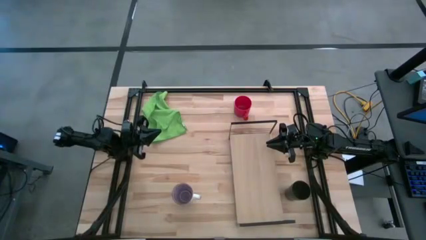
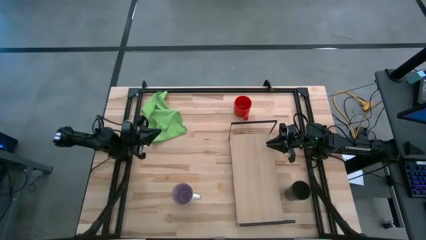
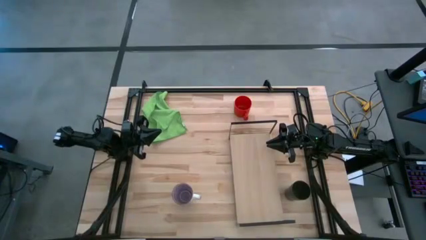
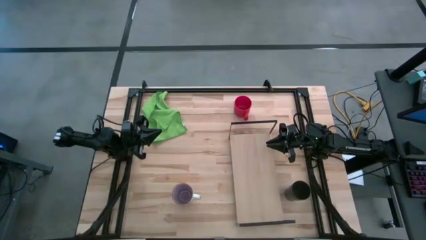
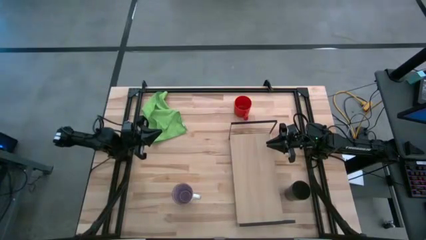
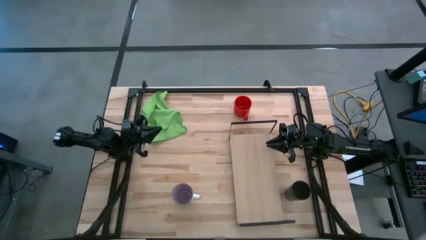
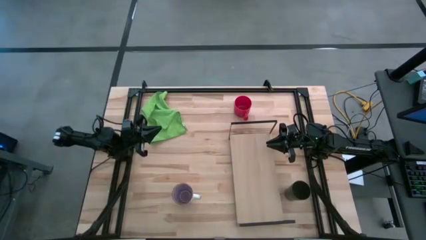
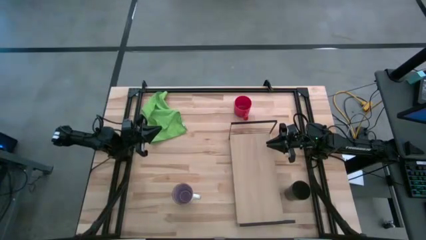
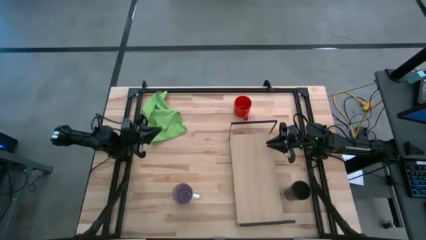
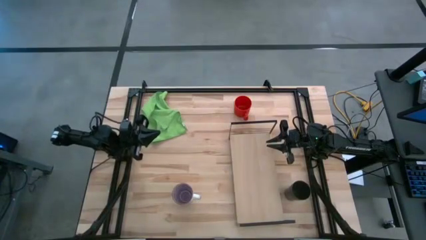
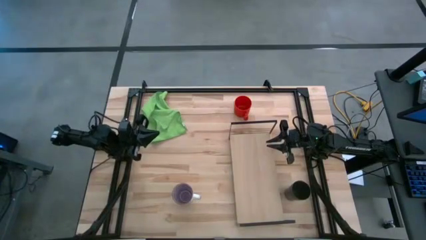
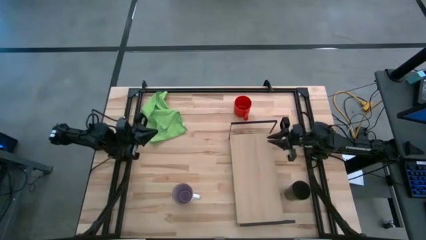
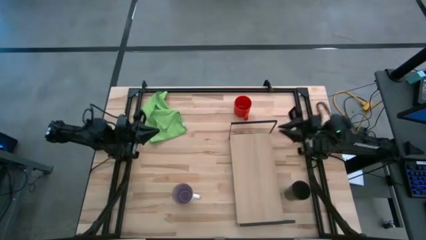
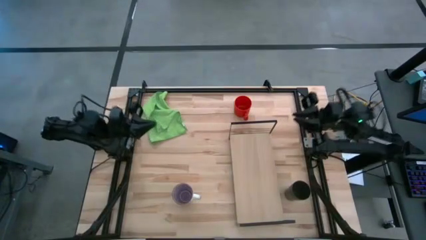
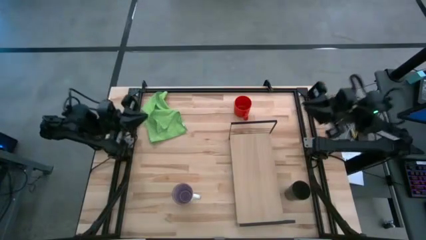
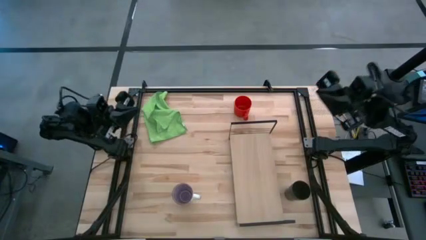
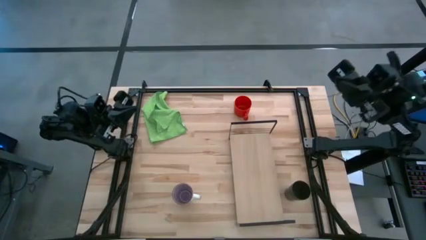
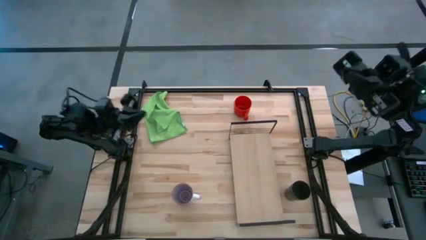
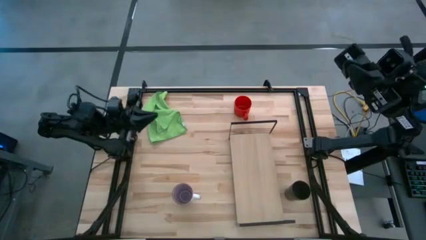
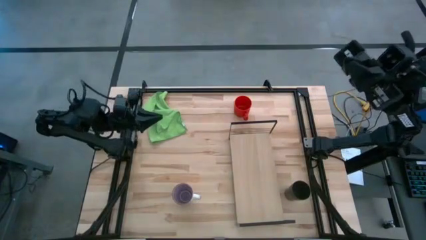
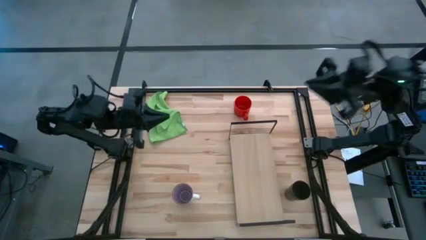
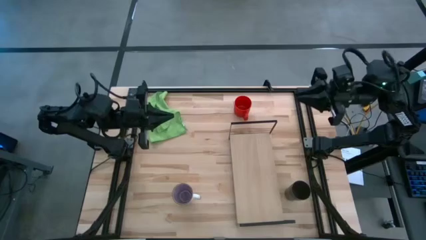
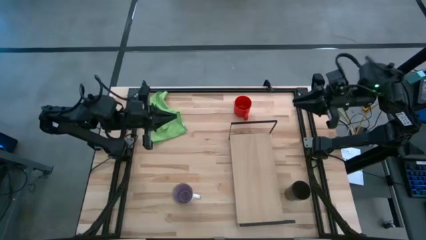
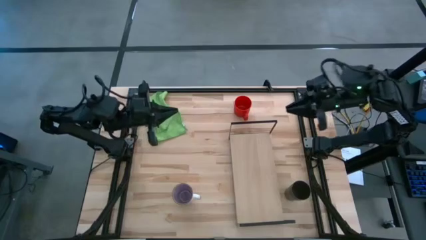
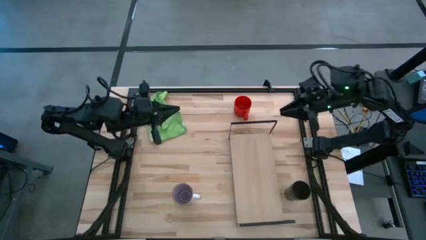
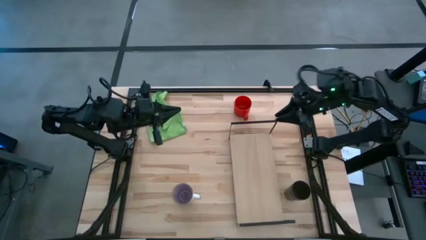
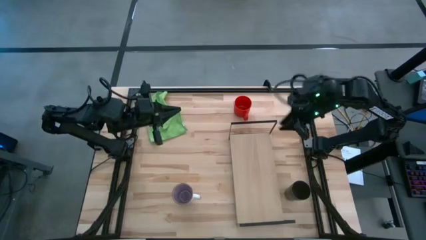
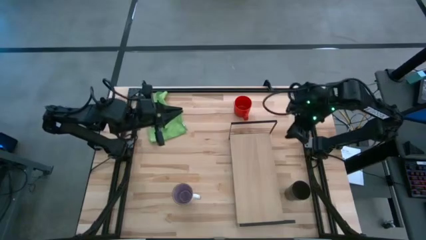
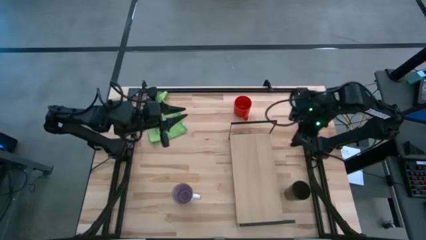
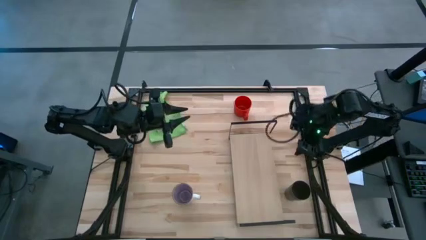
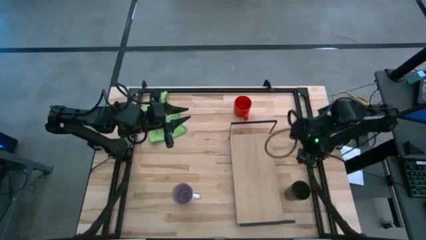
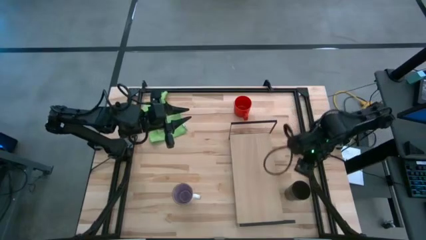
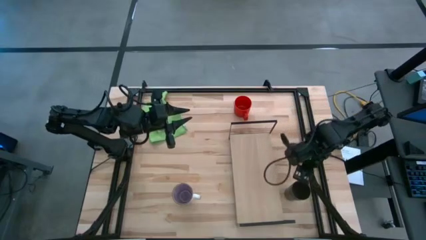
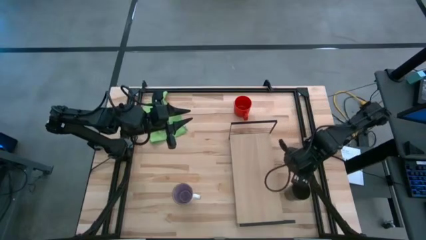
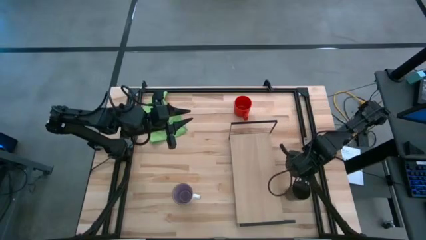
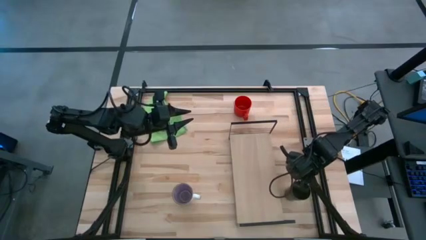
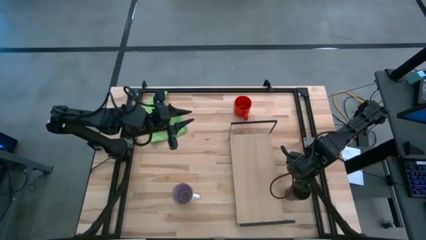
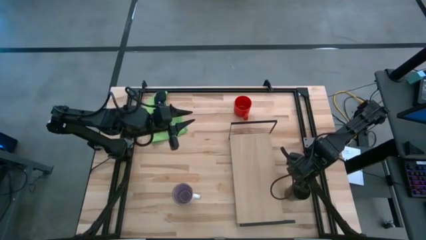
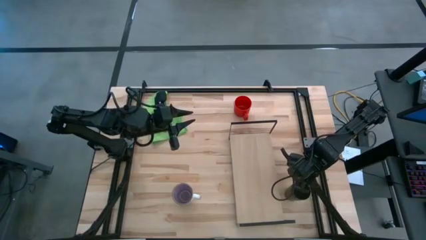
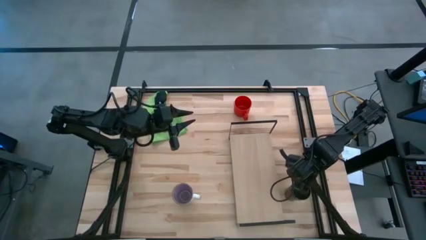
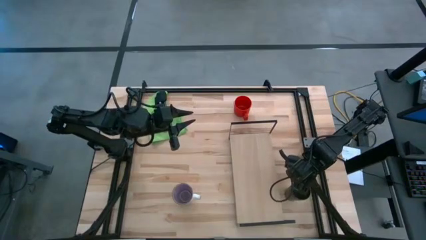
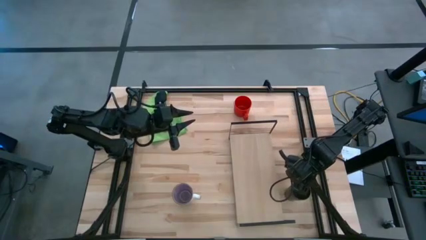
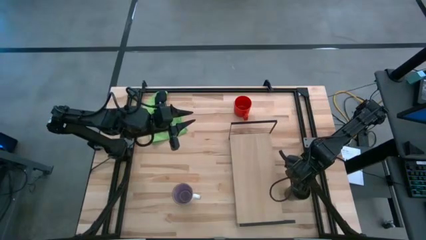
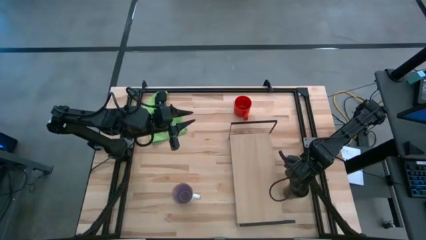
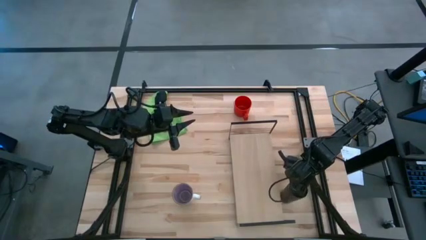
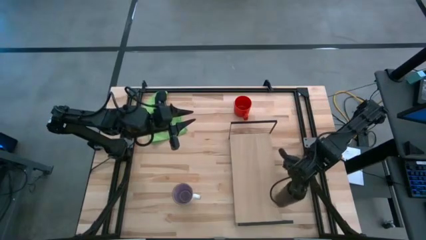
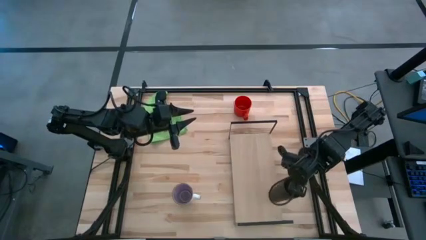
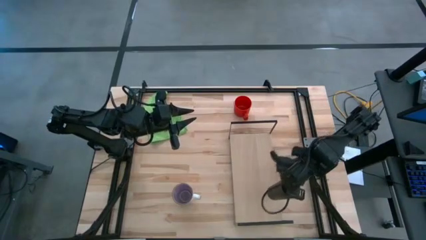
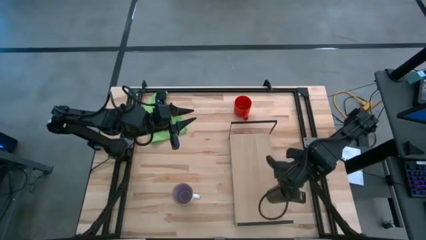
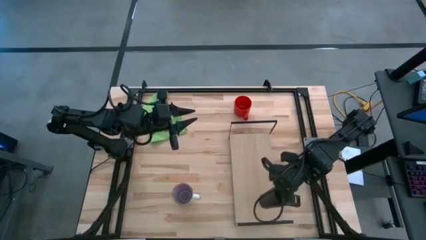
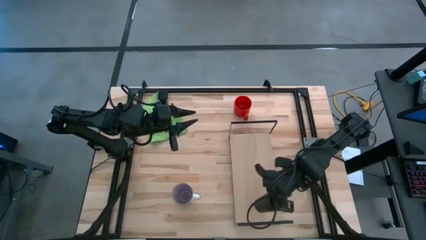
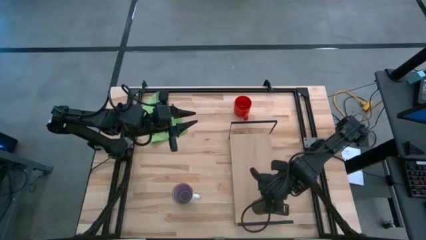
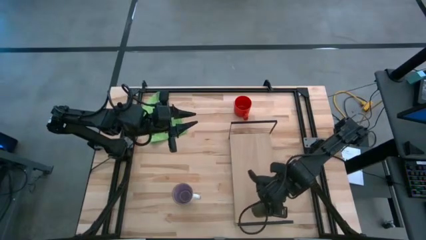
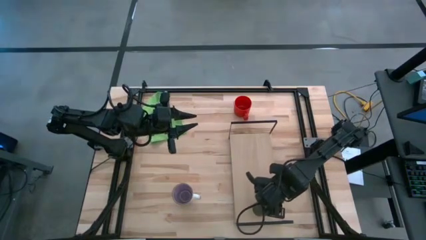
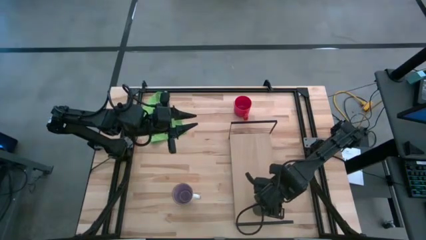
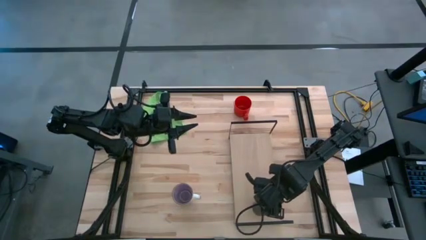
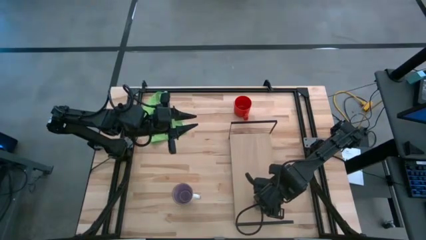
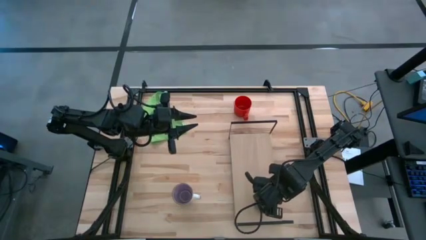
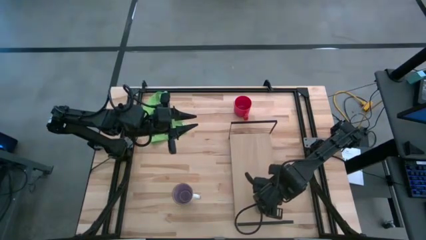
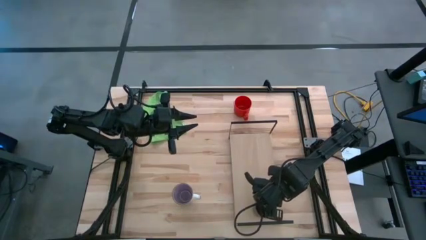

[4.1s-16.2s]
Task: Stack small to large cups/mugs on shelf
Put the black cup on the shelf
